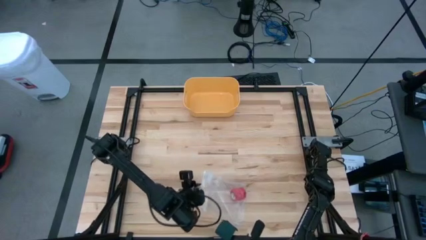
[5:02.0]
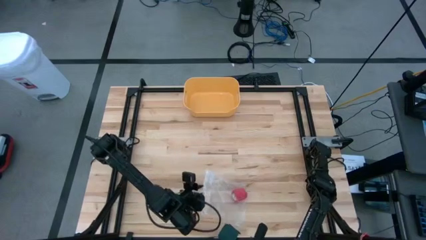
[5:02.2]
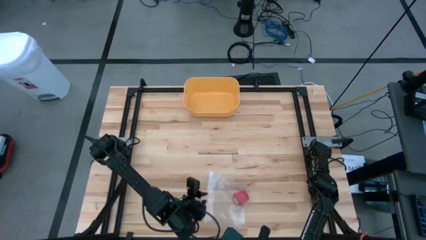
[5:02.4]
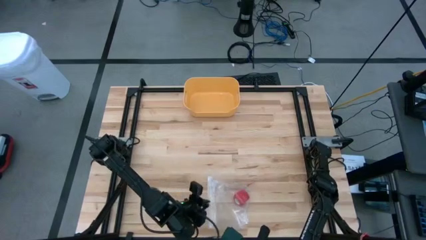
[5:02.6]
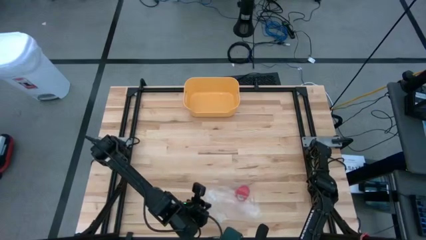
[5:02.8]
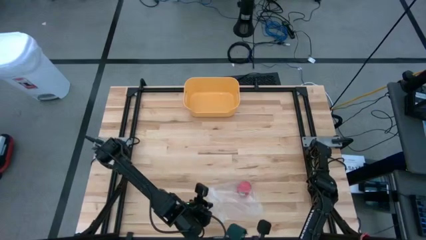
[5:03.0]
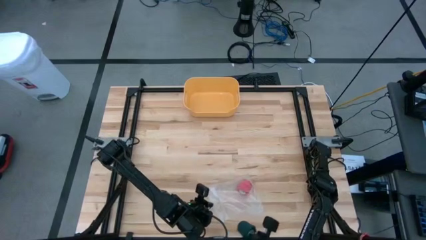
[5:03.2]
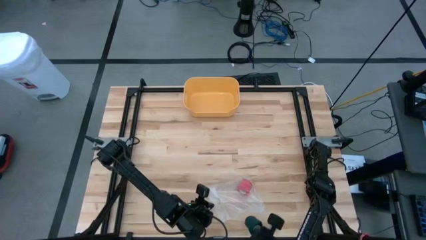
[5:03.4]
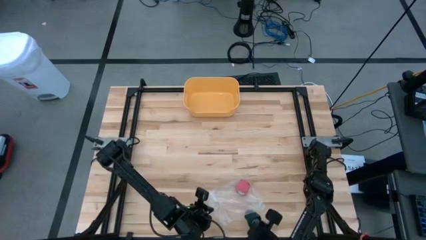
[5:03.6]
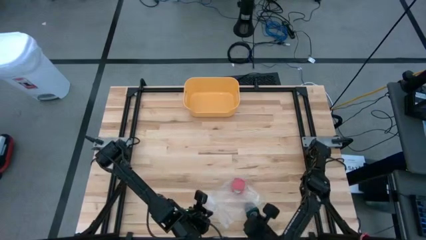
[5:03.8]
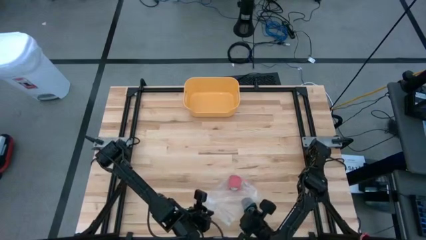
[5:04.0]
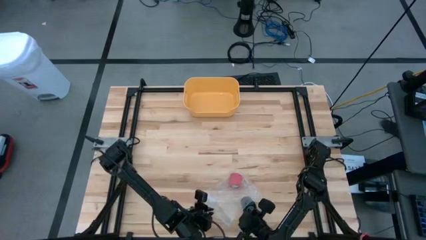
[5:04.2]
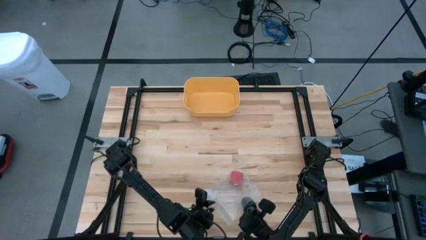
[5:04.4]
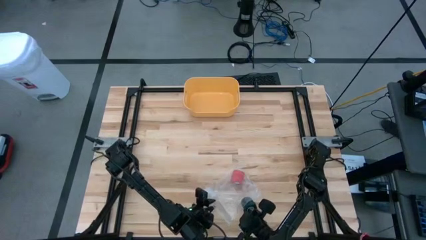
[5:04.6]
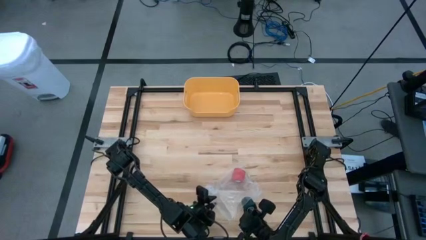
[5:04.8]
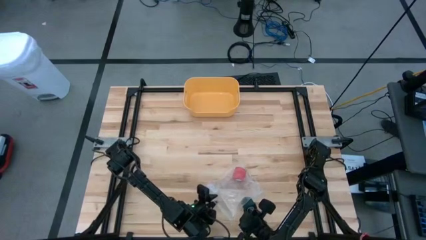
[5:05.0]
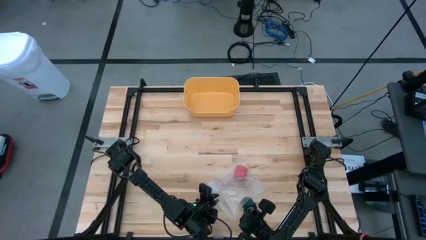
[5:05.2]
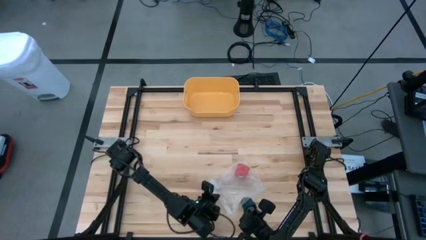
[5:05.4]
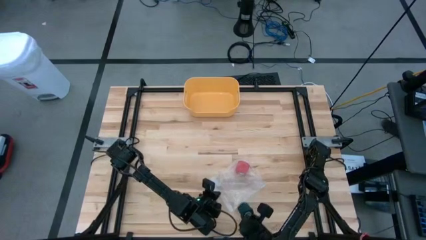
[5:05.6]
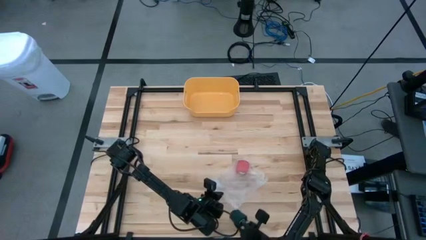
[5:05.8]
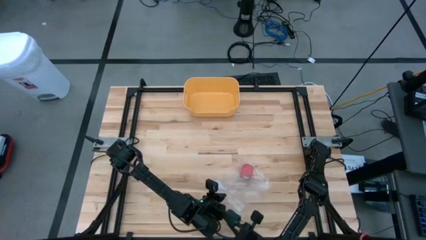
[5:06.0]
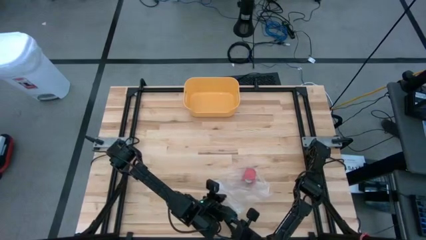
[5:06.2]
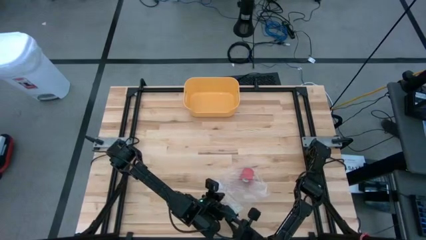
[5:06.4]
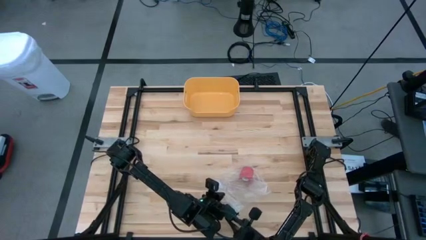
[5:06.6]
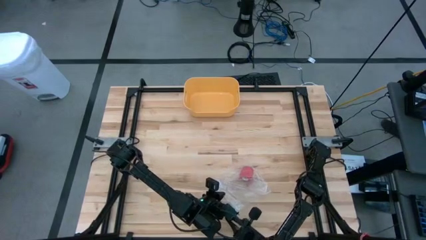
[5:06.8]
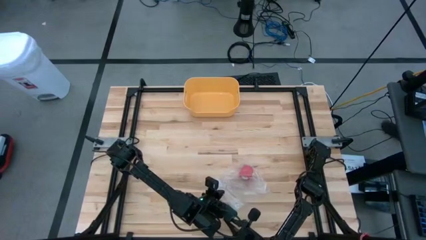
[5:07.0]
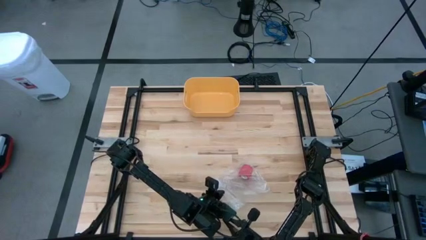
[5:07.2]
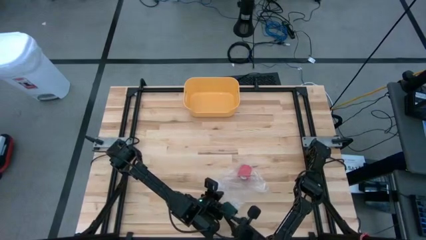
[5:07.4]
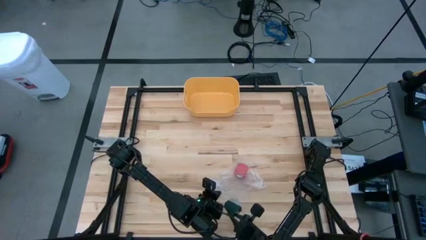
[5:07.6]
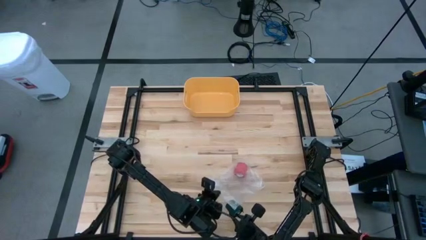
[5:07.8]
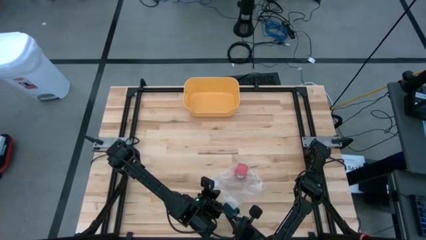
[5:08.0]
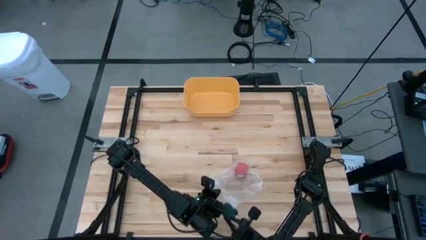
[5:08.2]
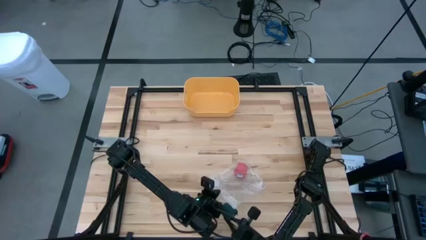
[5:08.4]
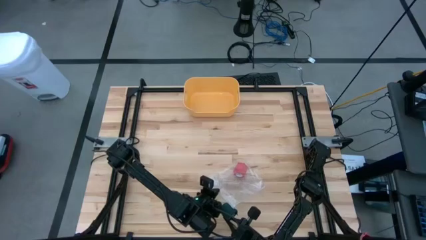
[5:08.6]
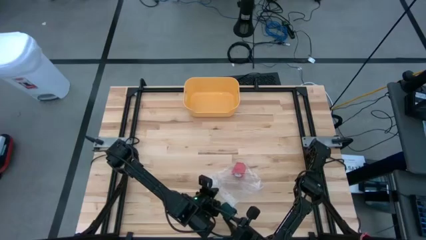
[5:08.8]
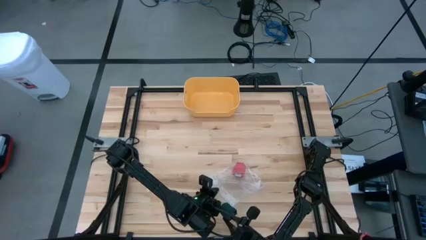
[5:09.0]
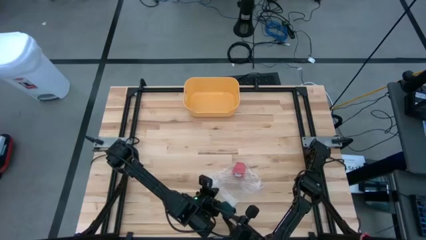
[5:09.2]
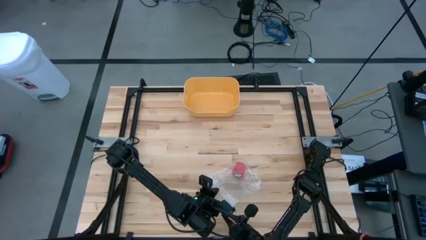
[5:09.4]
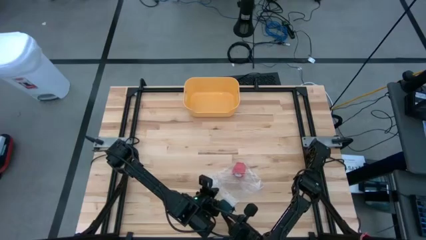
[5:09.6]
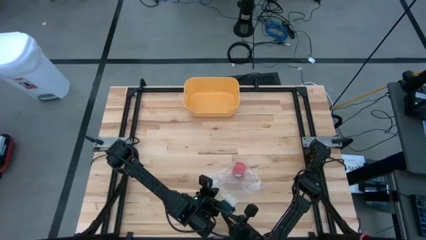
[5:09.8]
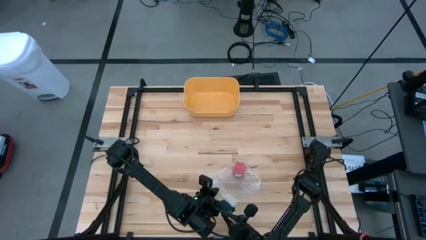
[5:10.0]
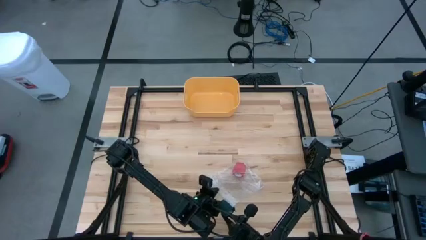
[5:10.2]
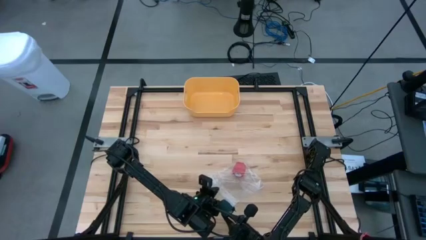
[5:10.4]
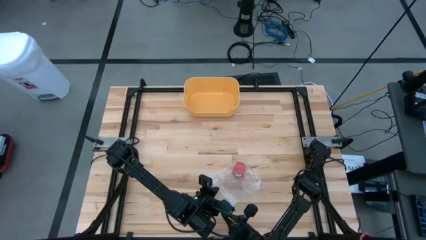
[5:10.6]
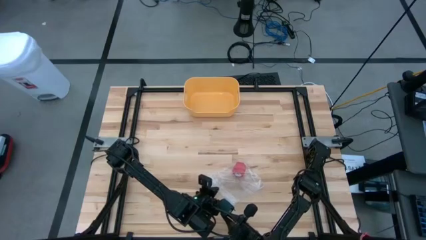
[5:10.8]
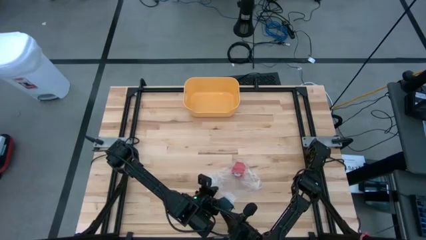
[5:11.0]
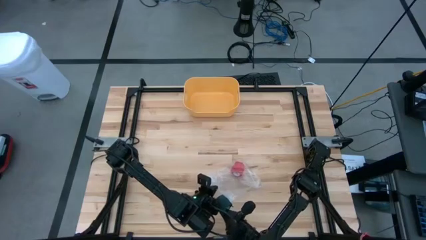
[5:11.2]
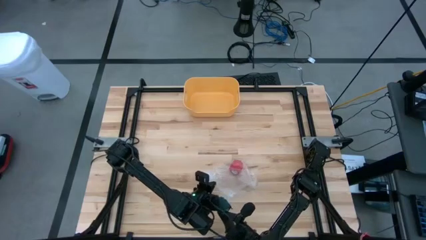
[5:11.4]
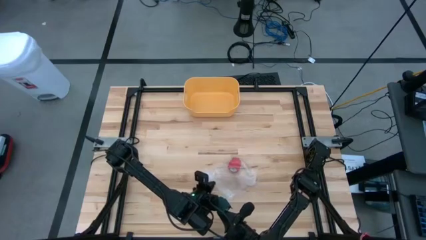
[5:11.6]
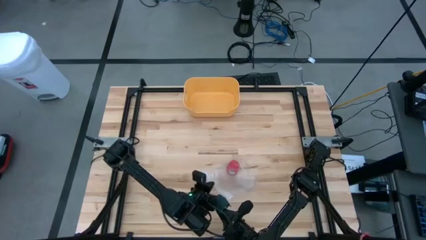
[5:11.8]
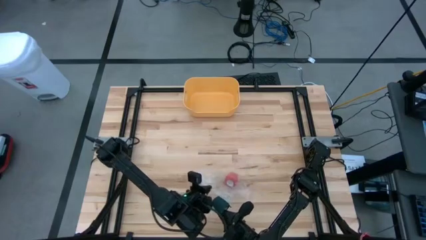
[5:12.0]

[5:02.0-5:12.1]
Task: Roll bandage
Put the rolled green bandage into the transparent zip bag

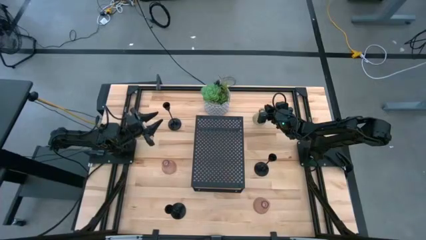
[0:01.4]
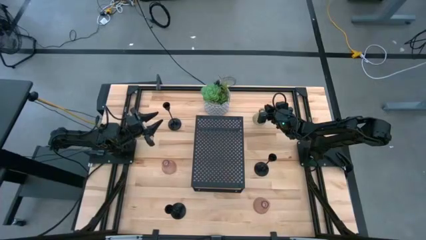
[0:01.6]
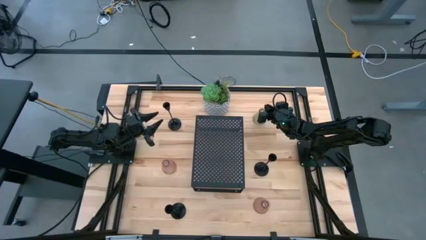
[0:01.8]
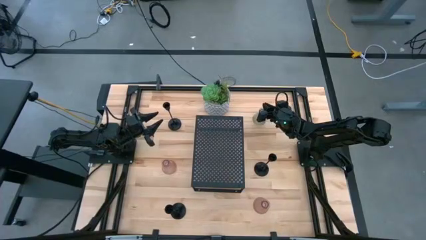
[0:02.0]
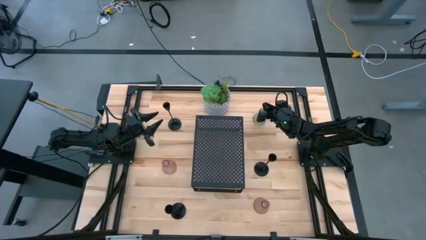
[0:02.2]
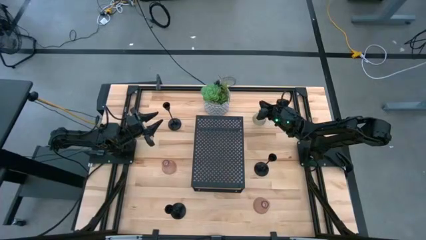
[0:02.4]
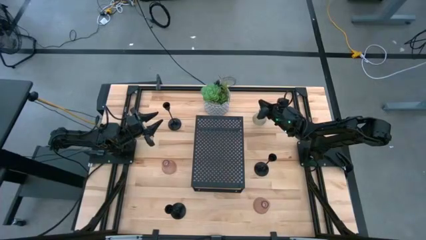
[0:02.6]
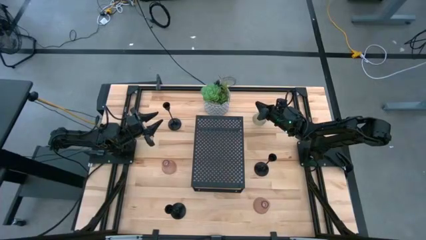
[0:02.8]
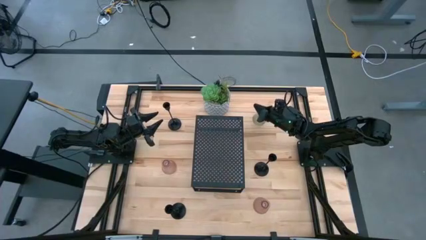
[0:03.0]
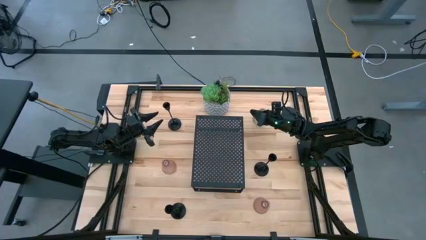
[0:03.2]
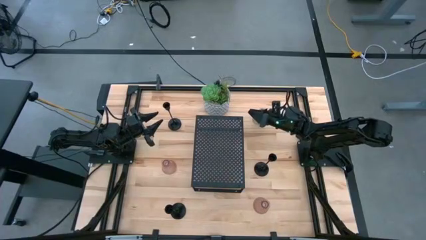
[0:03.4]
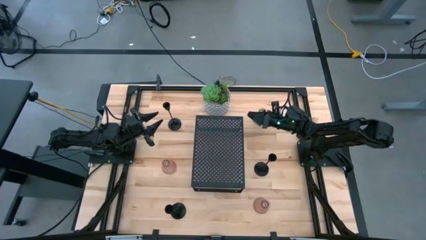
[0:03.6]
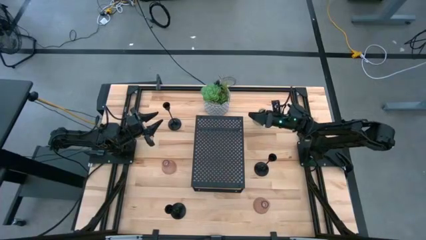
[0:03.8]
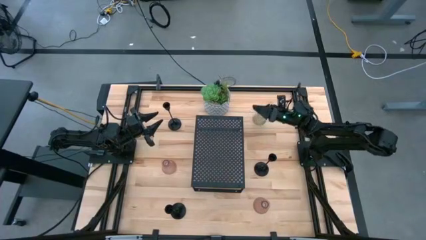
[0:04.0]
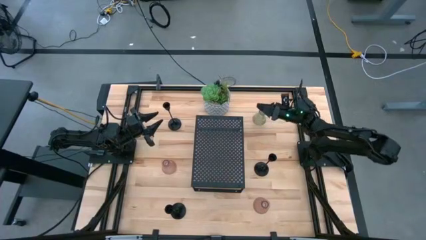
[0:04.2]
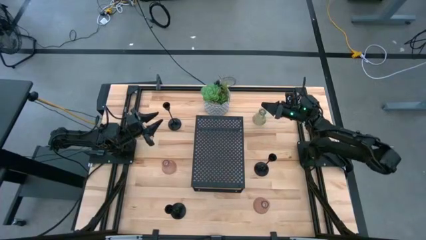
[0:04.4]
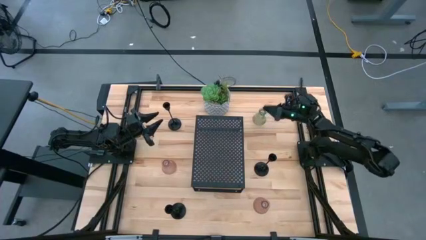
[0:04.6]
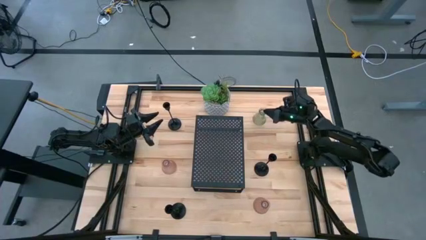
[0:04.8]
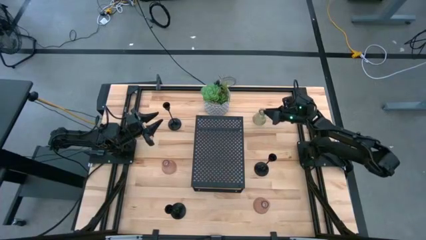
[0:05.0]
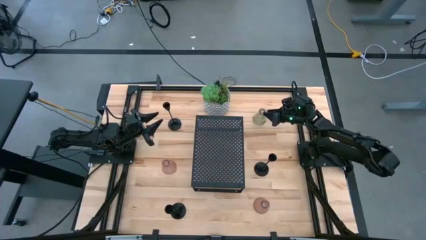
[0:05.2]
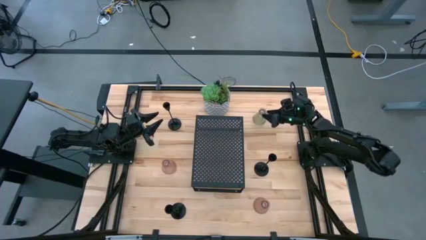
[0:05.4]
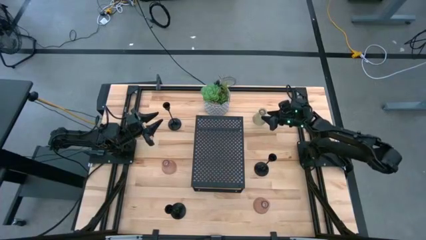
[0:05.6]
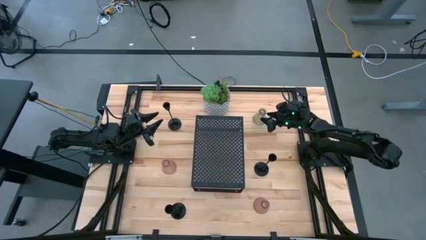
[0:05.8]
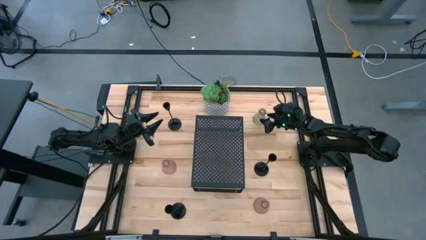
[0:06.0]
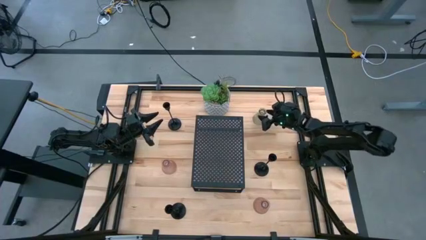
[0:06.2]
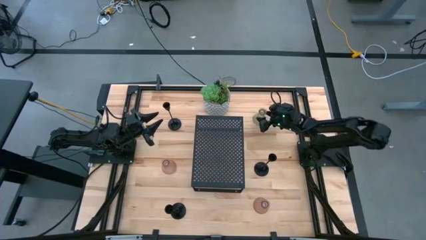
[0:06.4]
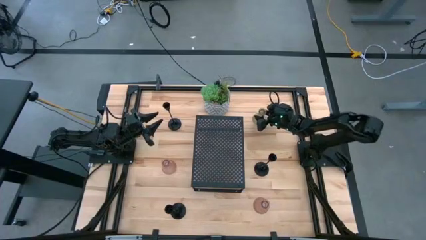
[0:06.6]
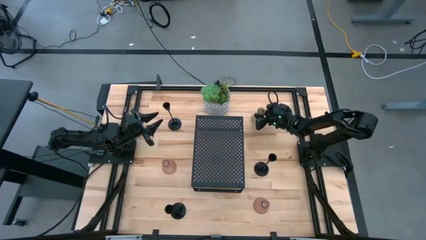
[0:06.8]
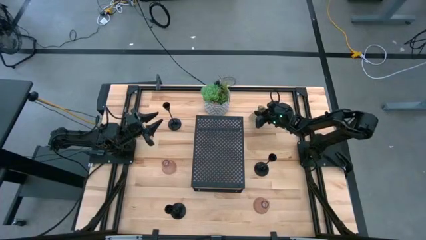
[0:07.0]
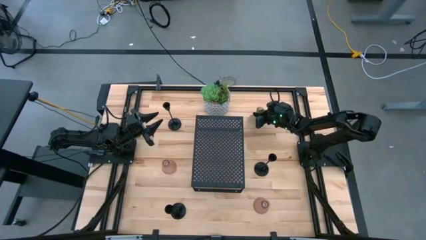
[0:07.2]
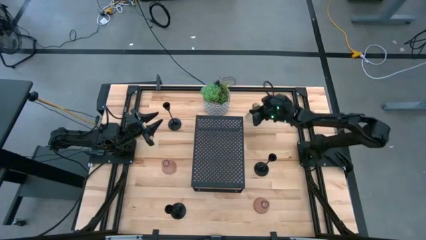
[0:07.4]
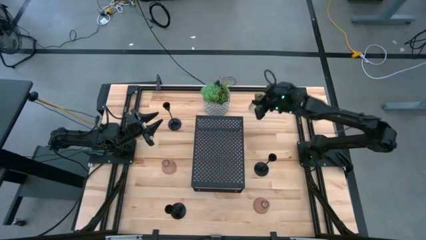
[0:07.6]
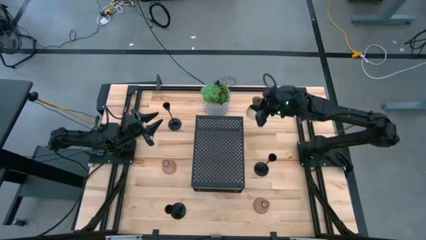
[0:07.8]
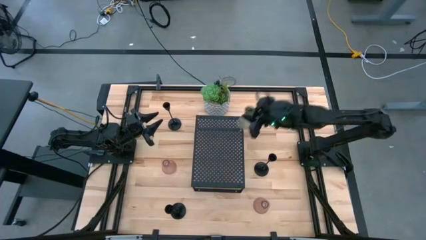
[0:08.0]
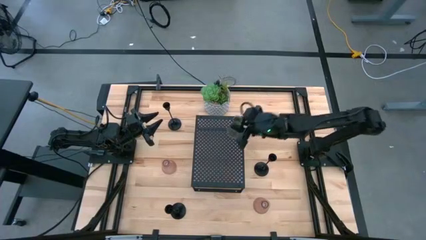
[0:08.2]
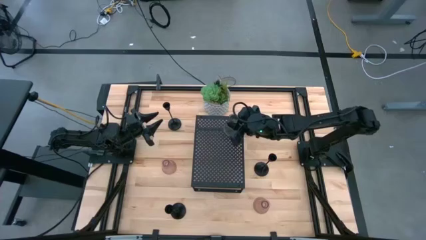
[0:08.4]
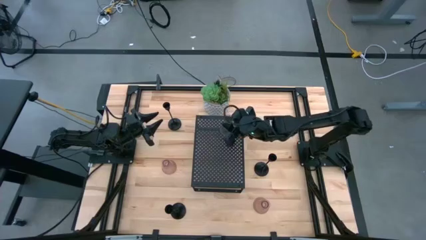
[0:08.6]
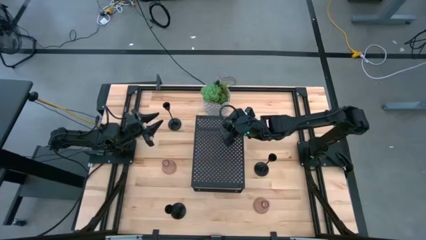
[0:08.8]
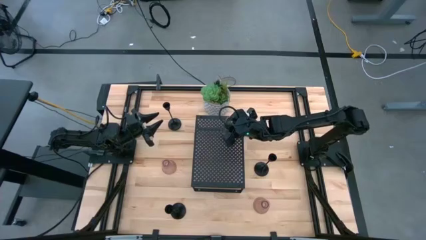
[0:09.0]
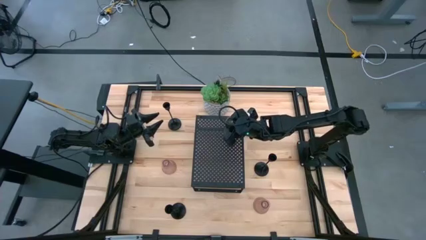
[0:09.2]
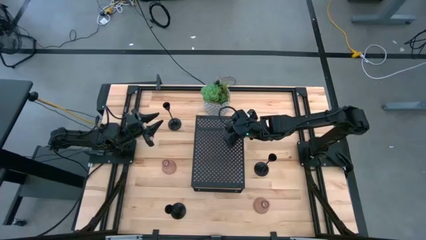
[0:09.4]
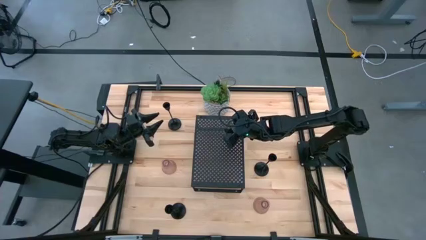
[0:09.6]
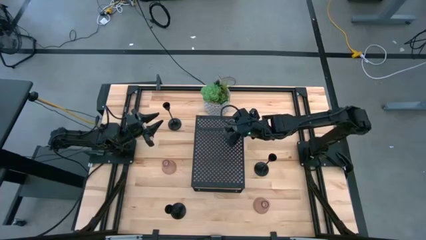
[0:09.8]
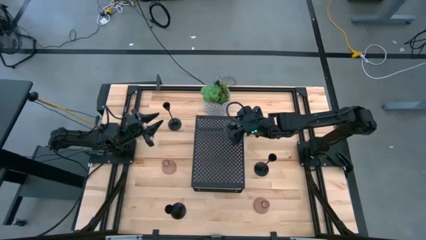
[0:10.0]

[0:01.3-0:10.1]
Task: Pick & Place candle stick holders
Put the green candle holder on the shelf
